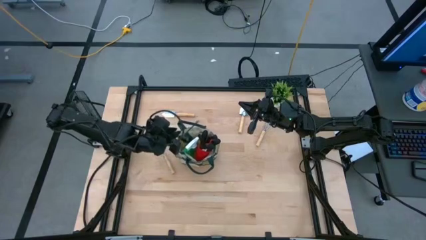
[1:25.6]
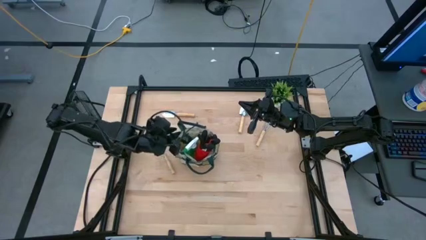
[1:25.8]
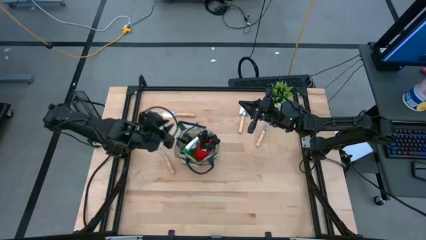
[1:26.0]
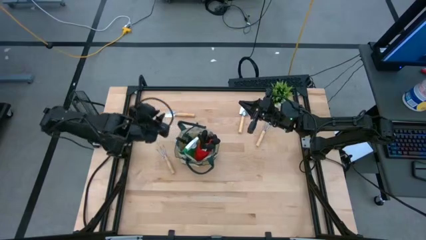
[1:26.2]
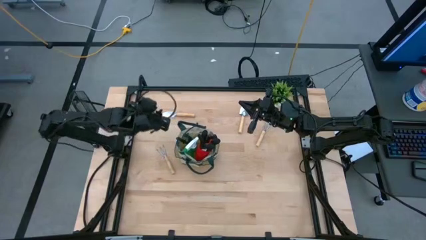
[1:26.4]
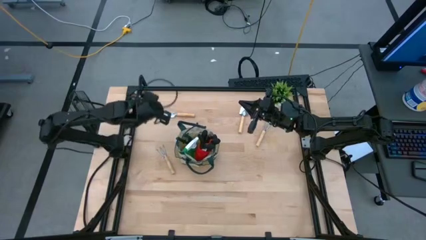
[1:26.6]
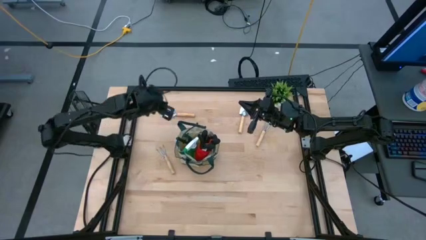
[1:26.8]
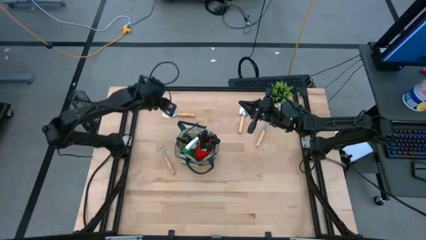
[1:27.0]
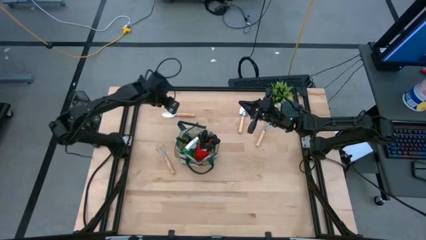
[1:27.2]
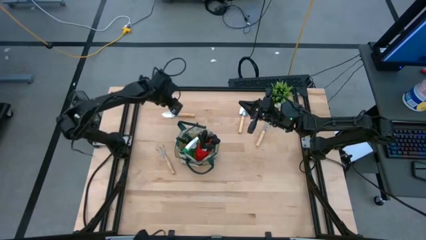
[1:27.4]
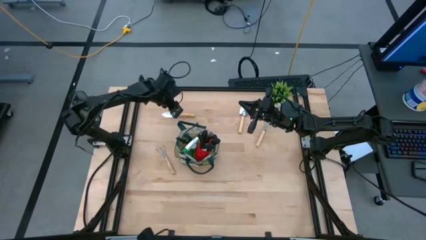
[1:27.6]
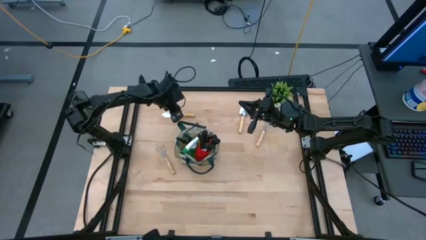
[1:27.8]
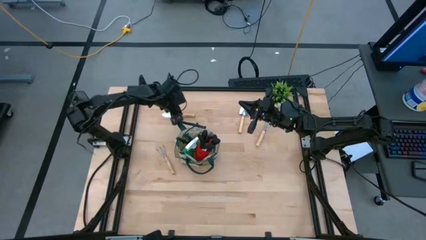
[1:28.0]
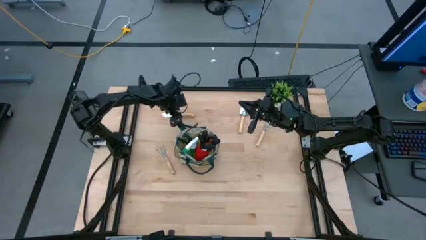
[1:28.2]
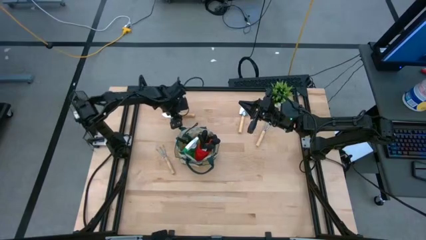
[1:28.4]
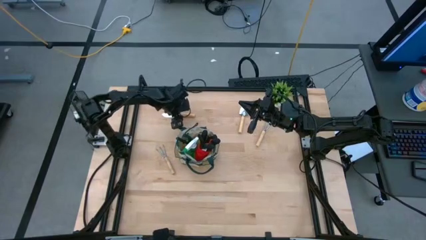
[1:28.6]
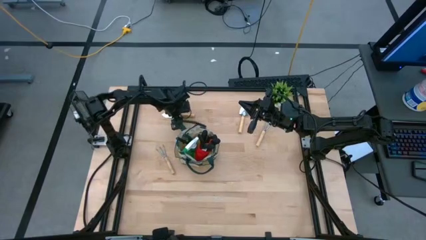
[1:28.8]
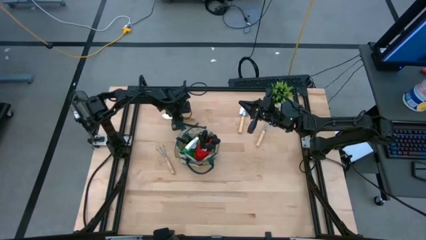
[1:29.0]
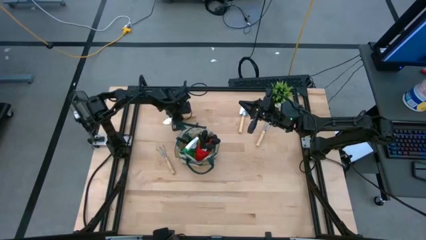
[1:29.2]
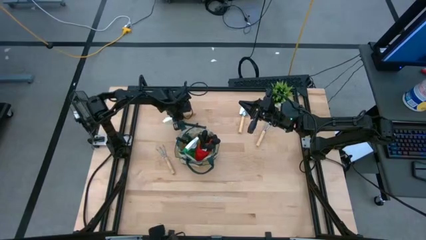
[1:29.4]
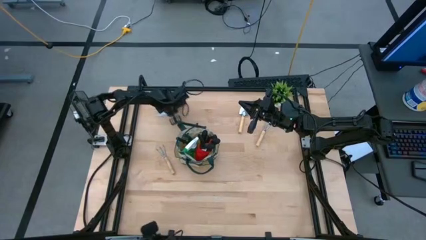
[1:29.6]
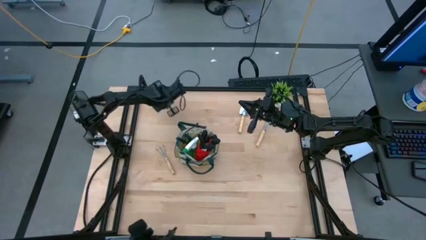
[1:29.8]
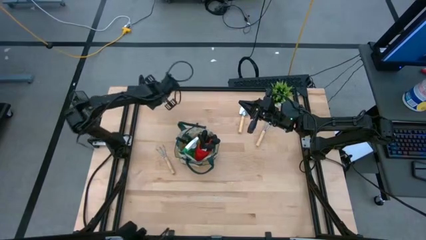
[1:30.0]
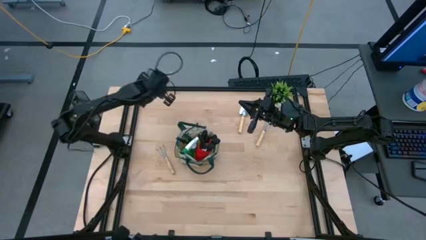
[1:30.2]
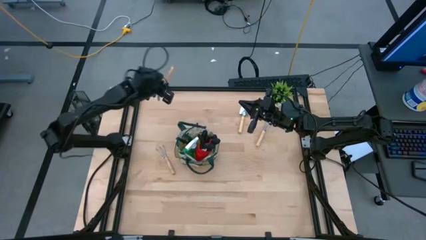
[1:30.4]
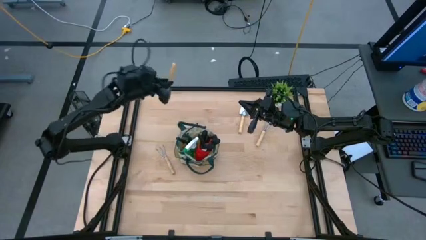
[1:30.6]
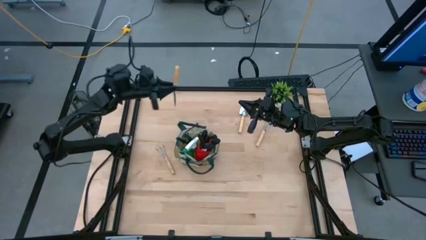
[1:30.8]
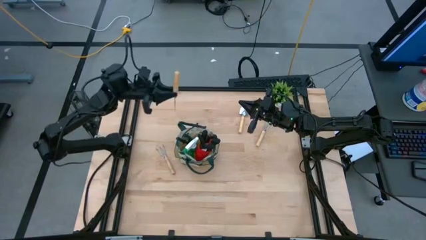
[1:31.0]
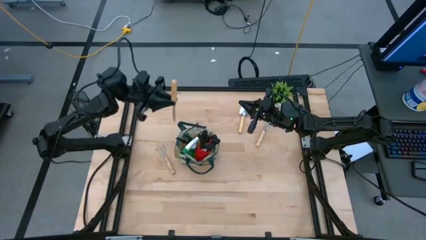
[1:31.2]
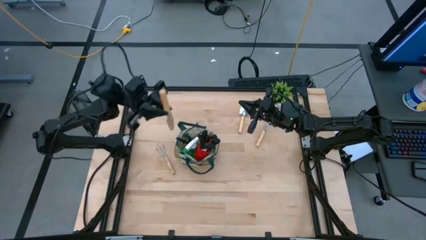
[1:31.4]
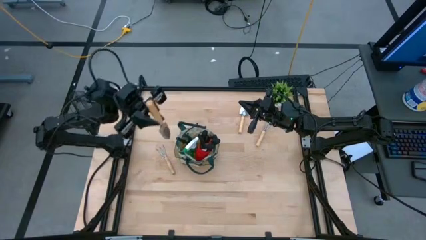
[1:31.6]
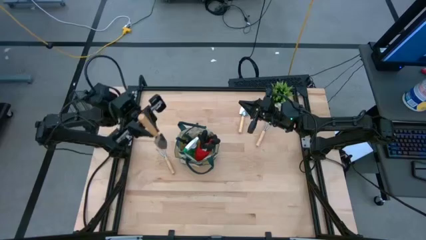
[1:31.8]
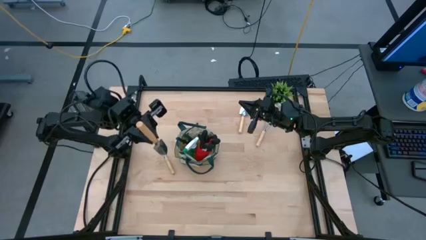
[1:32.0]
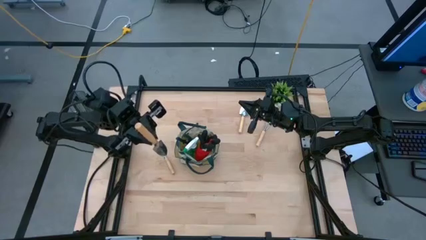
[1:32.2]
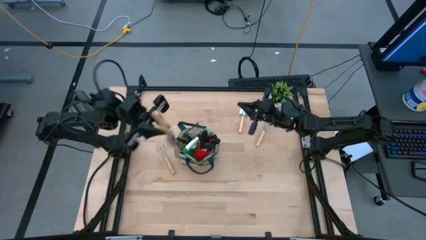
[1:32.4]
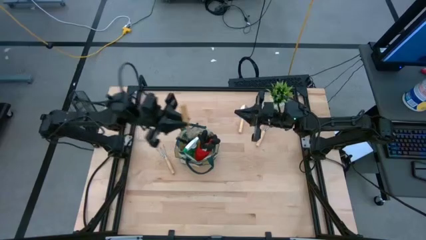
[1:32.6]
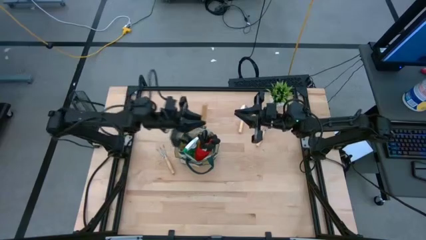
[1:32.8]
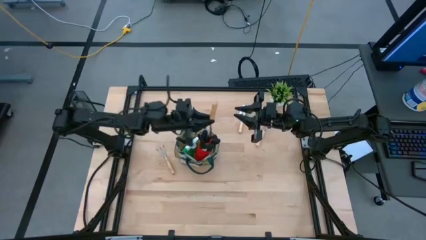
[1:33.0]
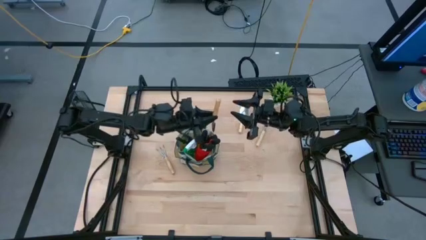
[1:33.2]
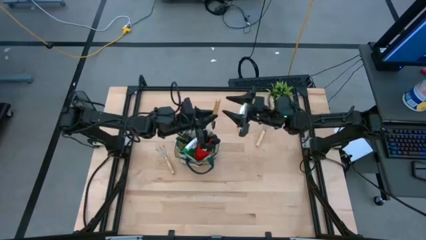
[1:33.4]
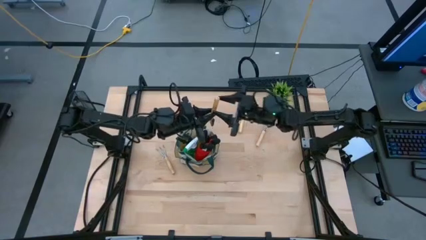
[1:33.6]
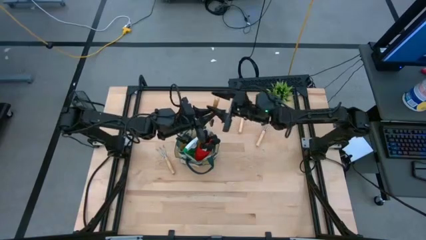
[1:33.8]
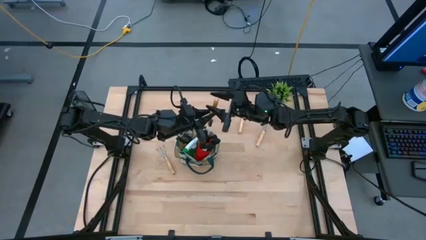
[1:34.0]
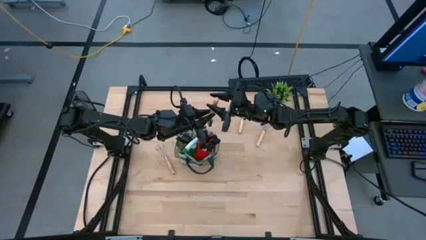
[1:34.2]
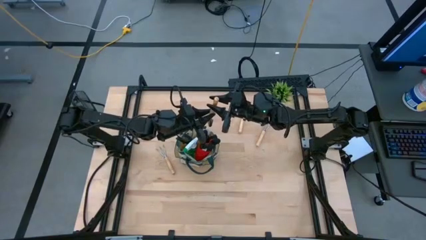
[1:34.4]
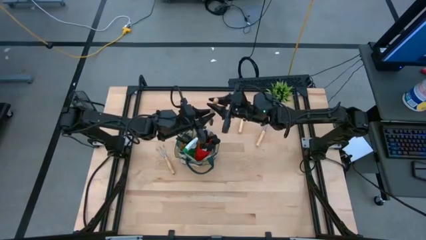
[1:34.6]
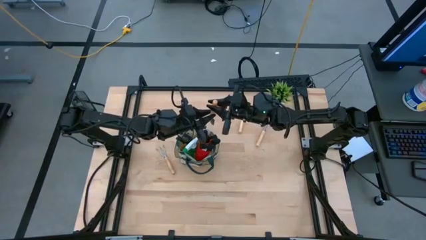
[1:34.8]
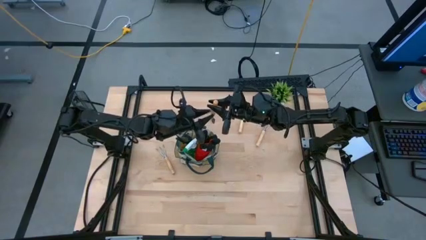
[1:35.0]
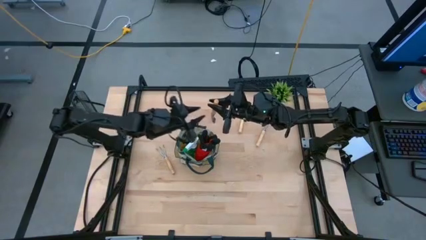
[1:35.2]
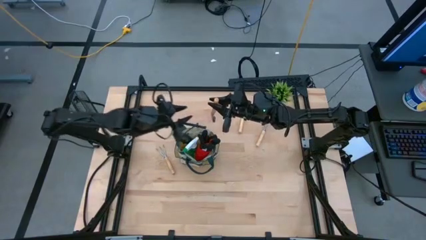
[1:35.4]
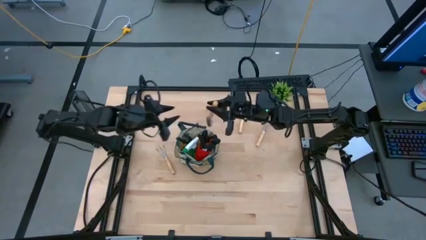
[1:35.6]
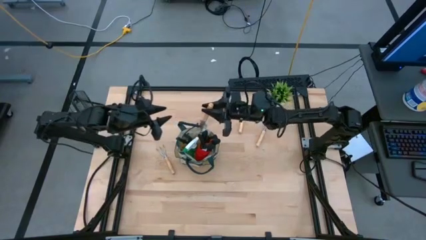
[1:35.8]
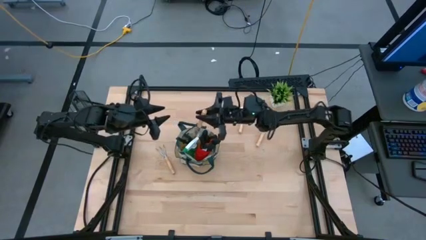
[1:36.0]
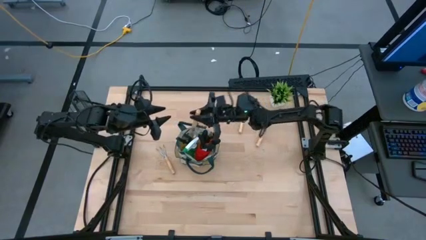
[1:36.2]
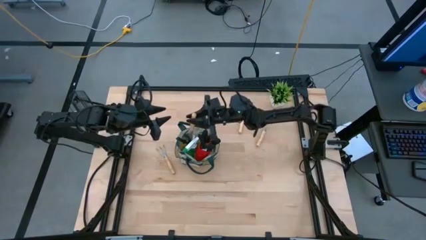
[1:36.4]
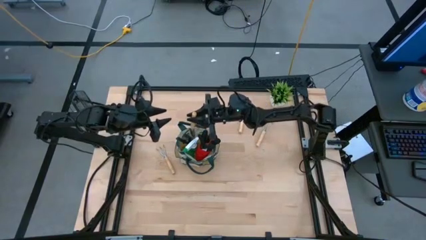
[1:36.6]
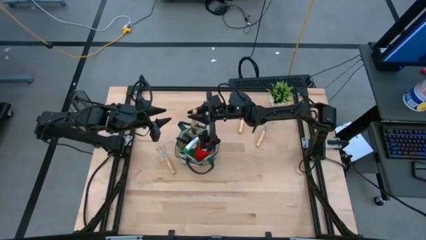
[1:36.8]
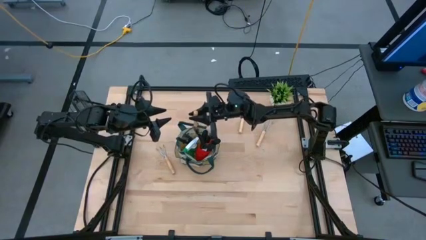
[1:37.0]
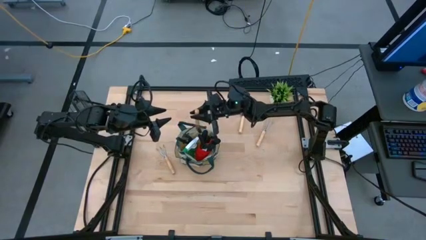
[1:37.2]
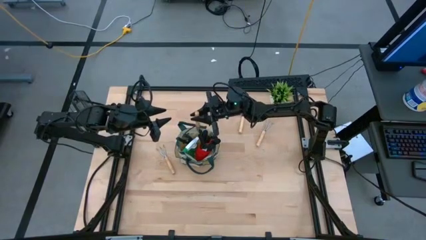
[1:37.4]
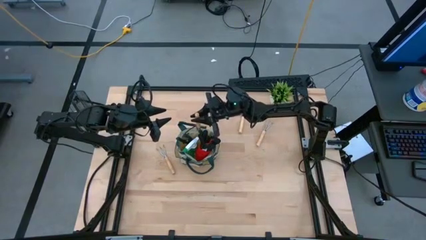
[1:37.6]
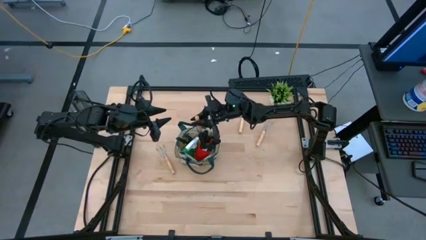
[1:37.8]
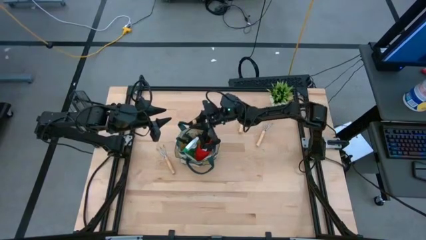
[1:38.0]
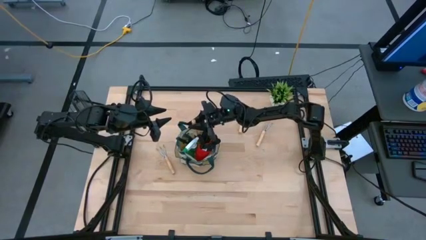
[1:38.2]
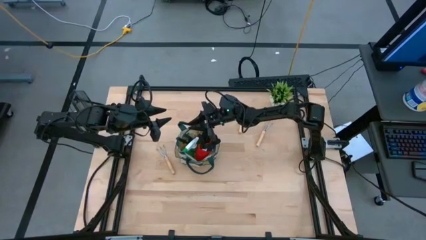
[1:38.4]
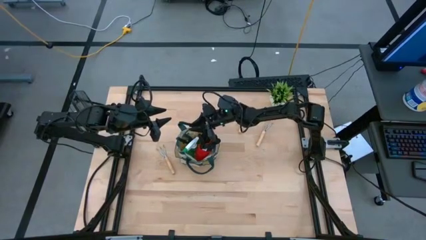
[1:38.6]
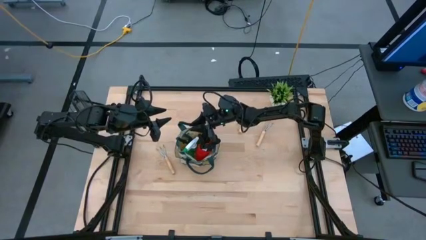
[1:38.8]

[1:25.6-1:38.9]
Task: Pick & Place Garden tools in Gardening bag
Put the left brown trowel into the brown gardening bag
